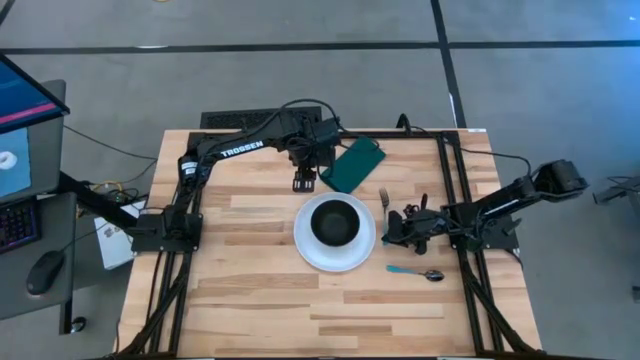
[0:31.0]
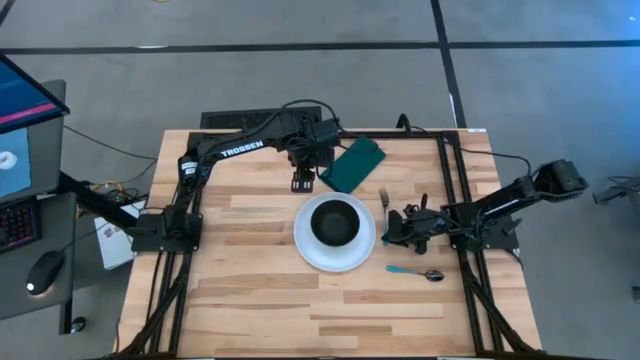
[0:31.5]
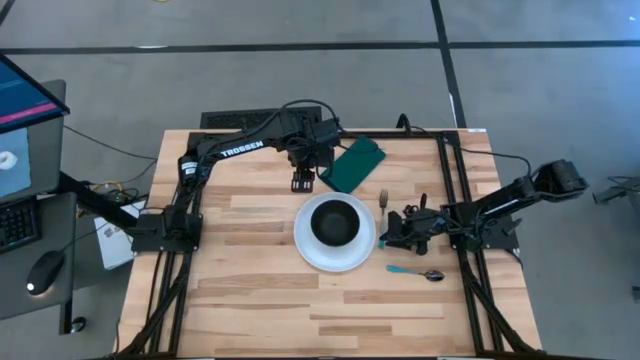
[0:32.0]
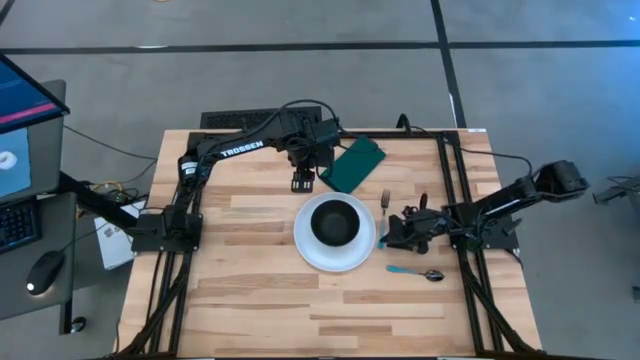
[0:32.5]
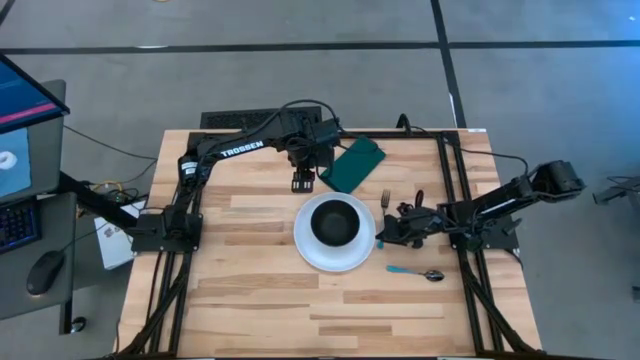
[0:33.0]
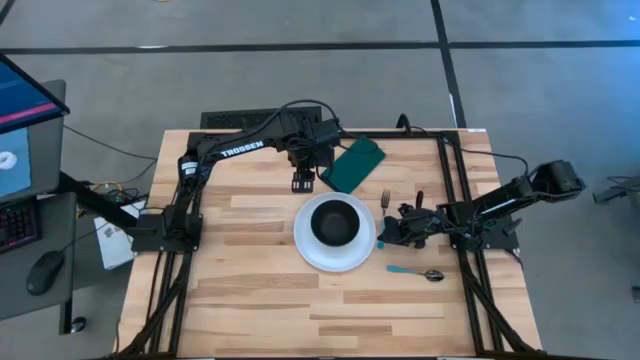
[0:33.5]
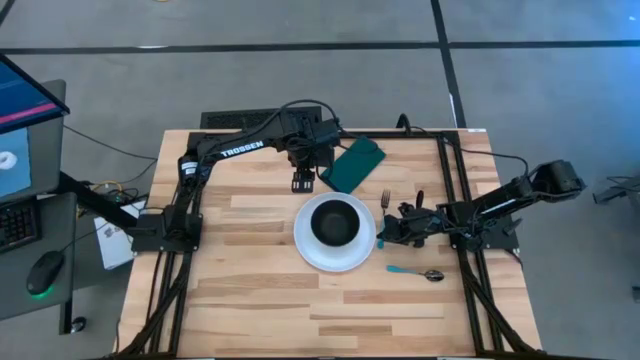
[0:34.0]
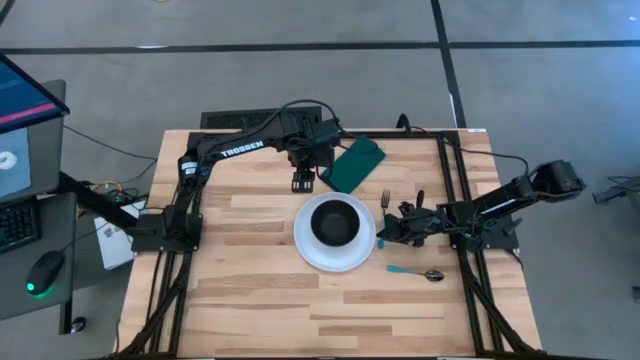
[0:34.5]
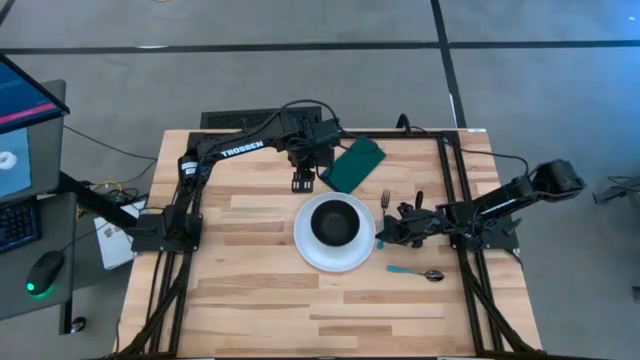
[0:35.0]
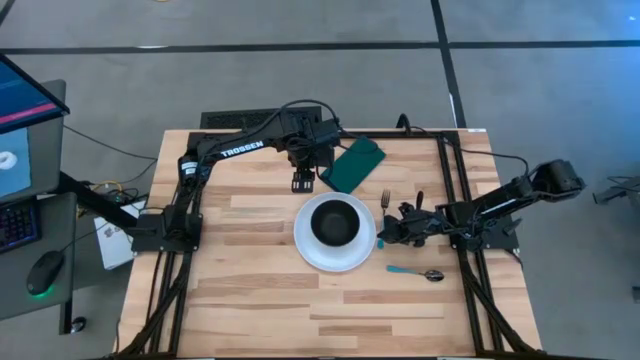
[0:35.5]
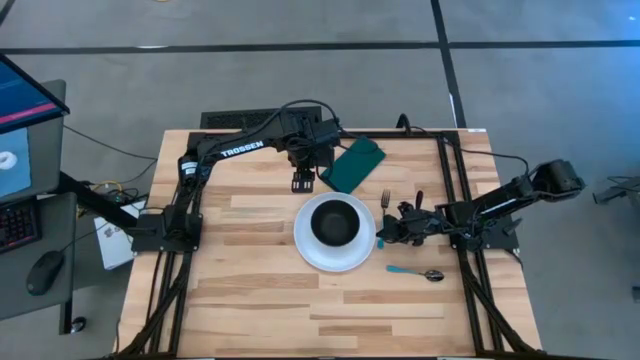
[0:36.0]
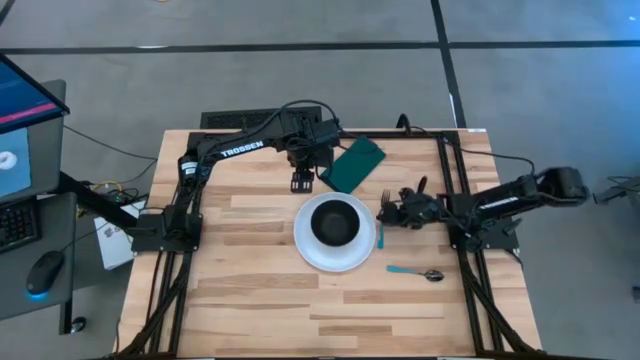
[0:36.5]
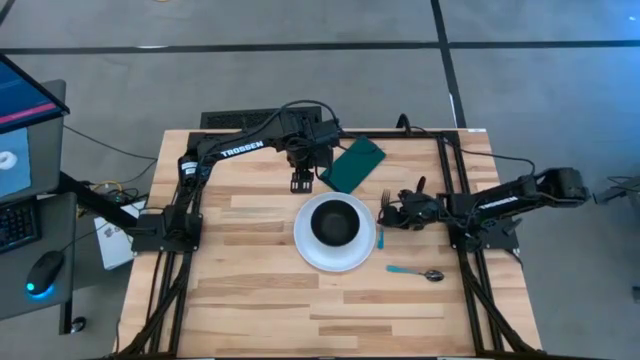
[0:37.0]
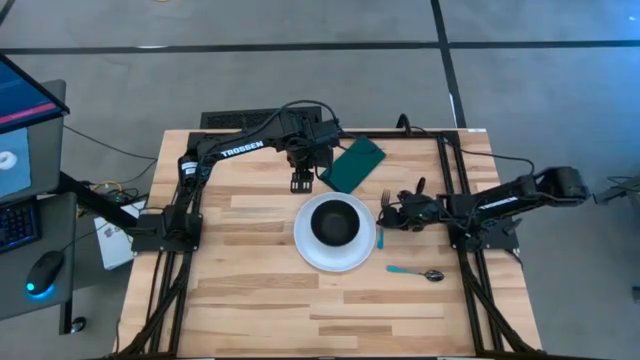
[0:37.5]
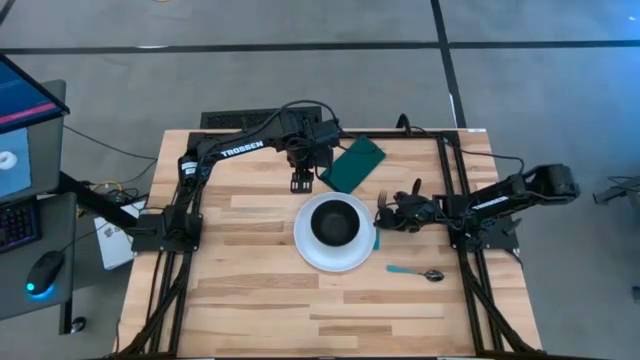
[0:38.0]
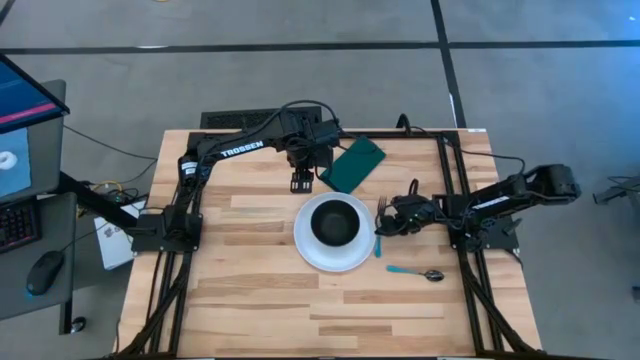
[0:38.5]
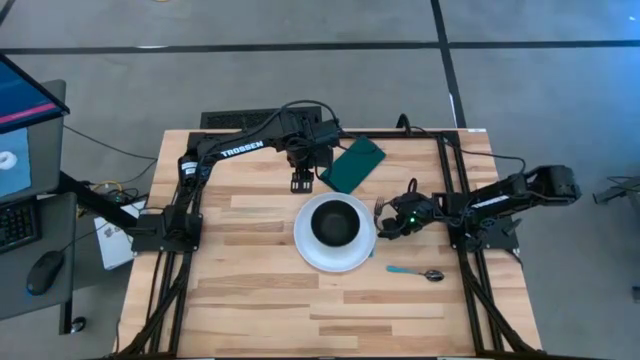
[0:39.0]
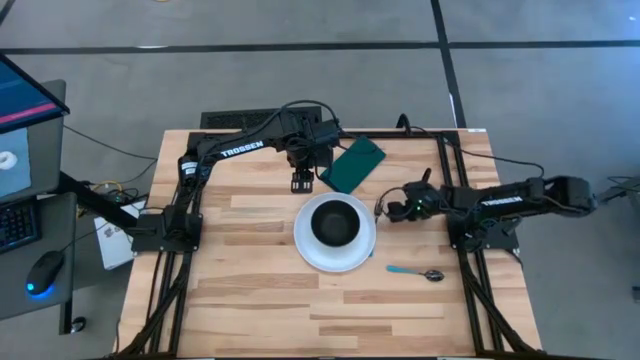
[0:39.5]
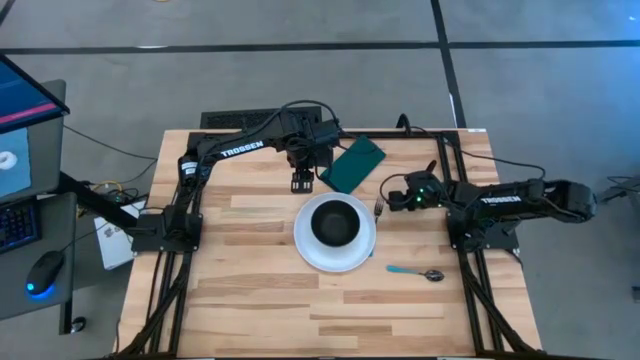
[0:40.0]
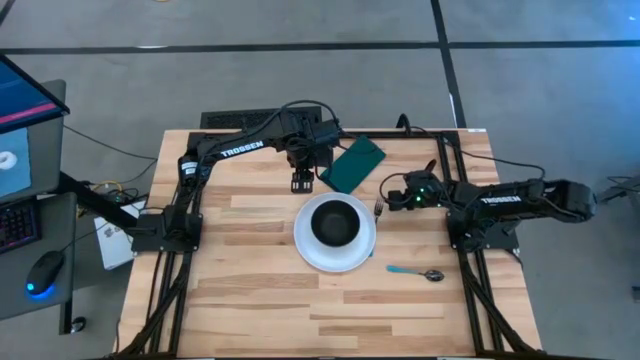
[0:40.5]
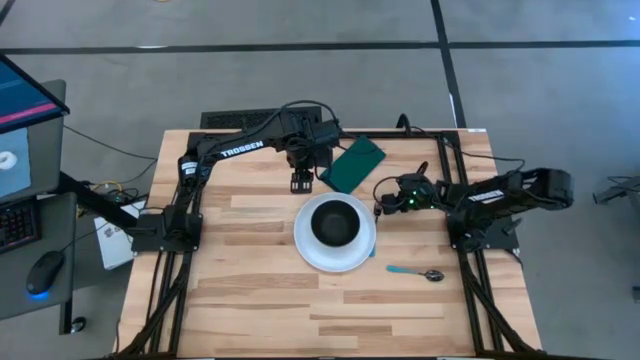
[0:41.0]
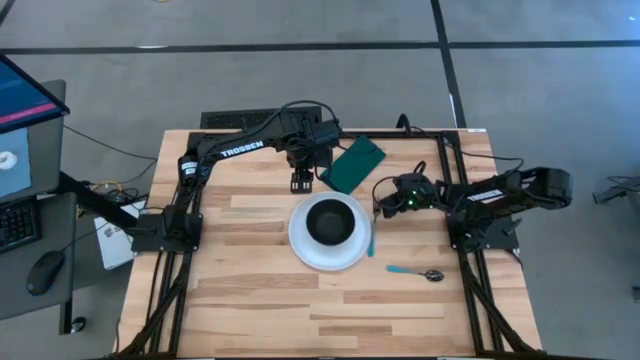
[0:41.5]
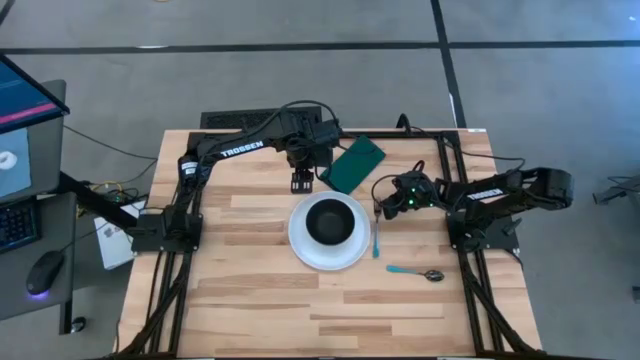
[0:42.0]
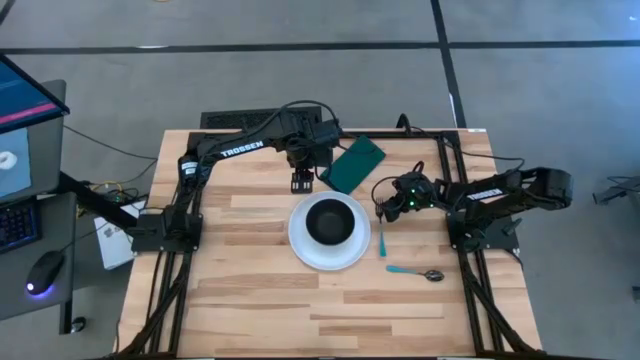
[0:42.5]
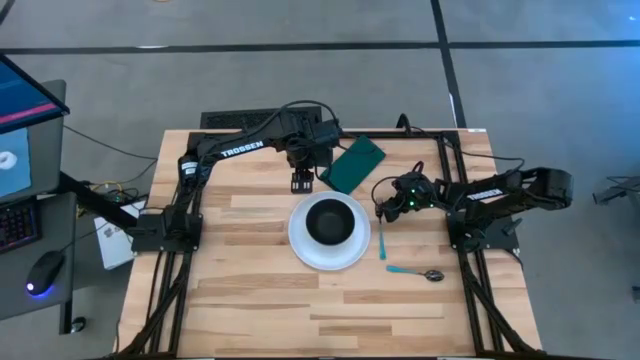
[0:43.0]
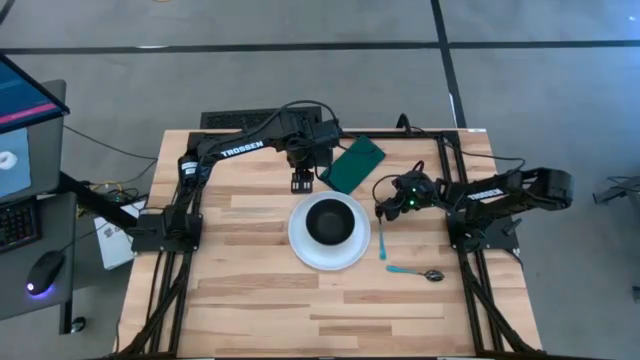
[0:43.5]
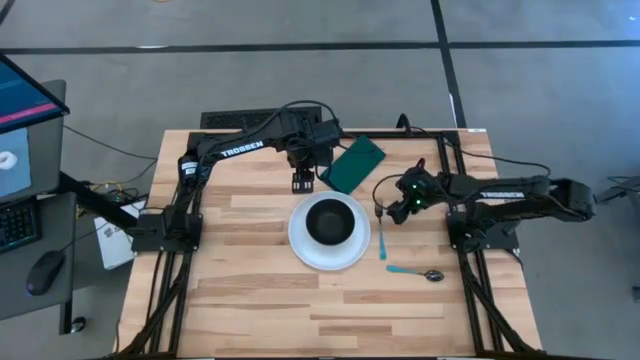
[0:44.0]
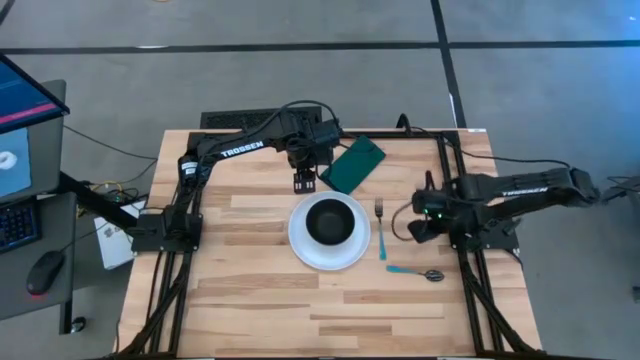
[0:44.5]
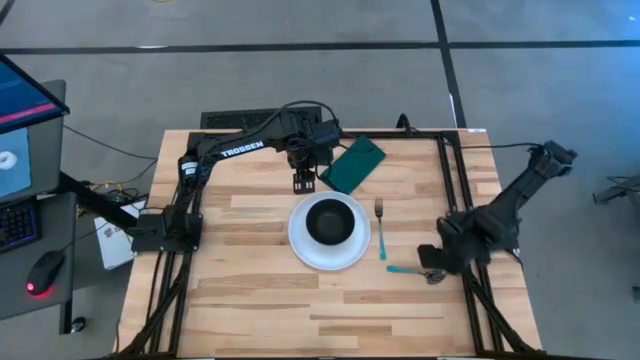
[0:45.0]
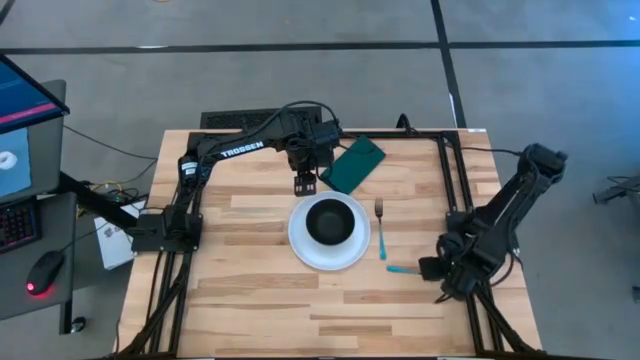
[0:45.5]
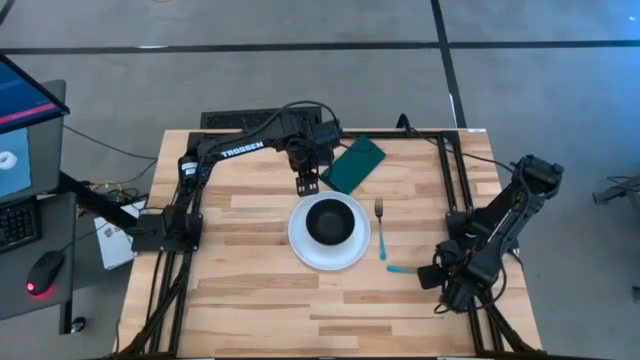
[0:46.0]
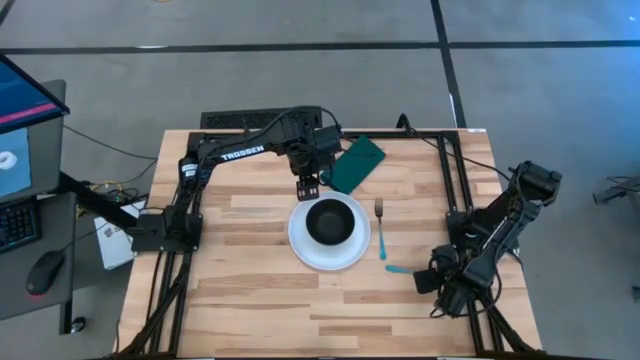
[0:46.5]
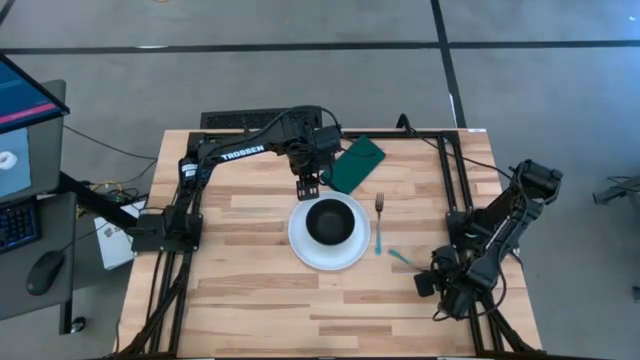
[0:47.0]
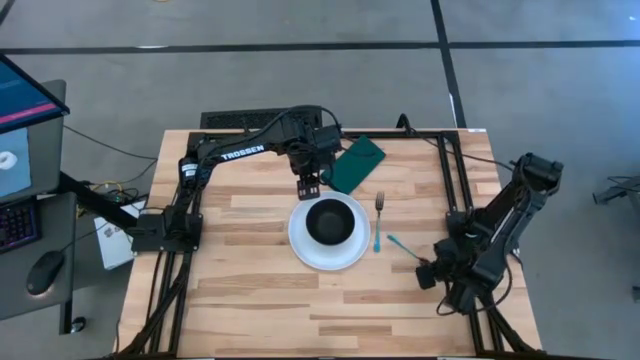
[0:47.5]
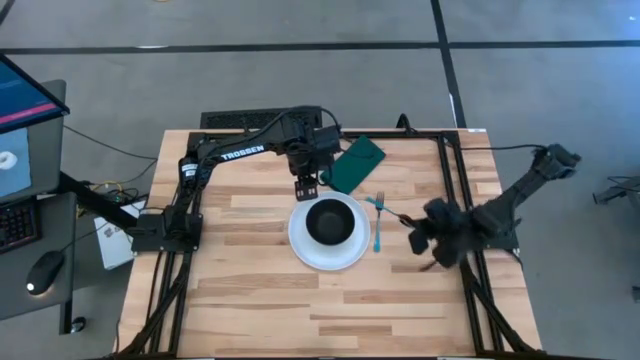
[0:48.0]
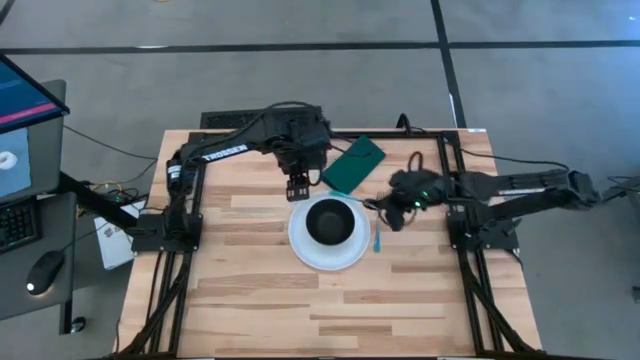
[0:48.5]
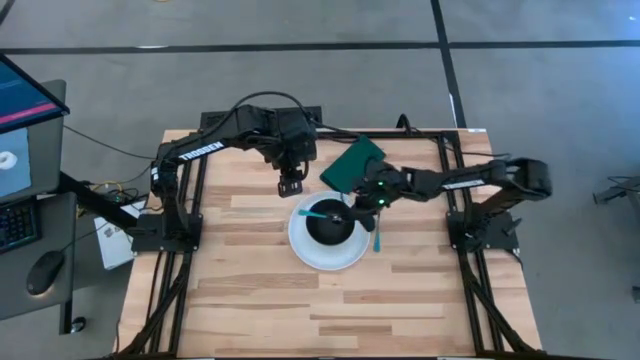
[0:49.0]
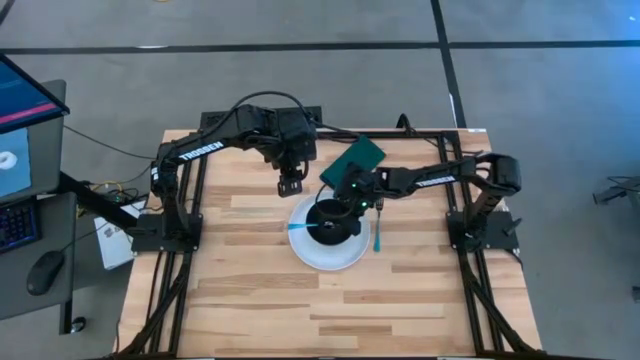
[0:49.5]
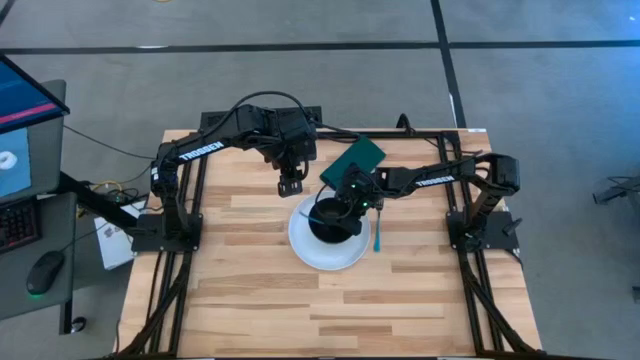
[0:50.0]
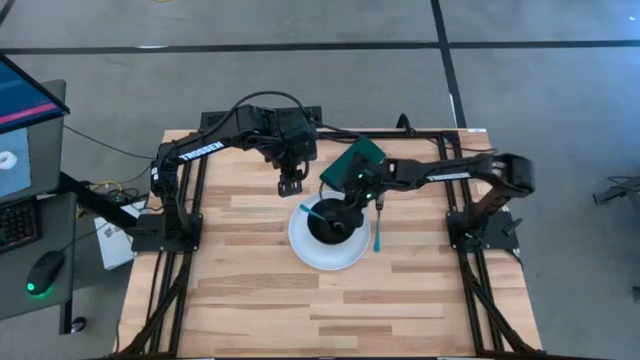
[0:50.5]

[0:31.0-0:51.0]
Task: Set table place
Put the blue spoon into the black bowl
